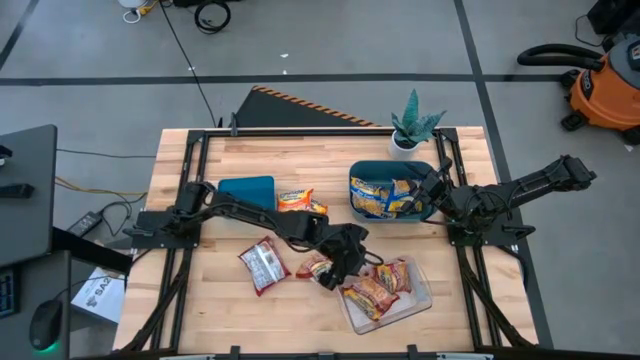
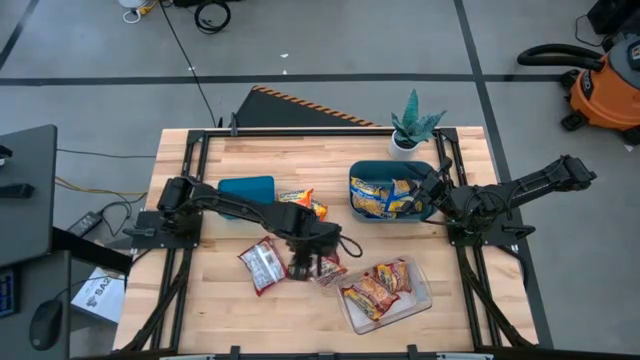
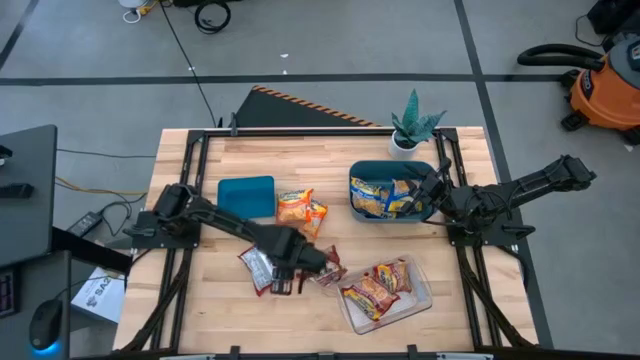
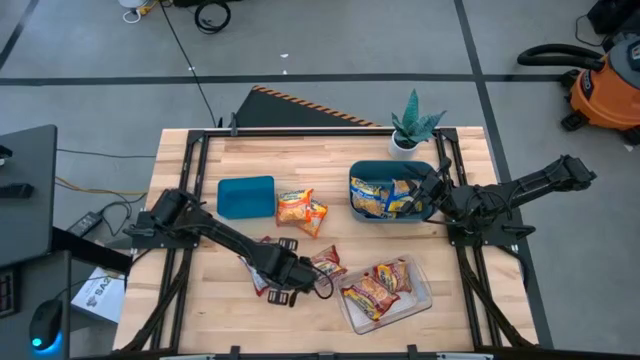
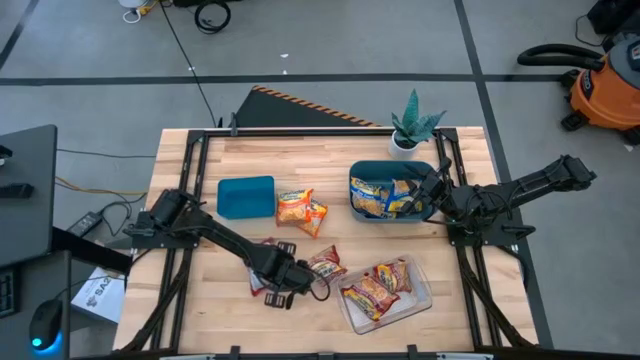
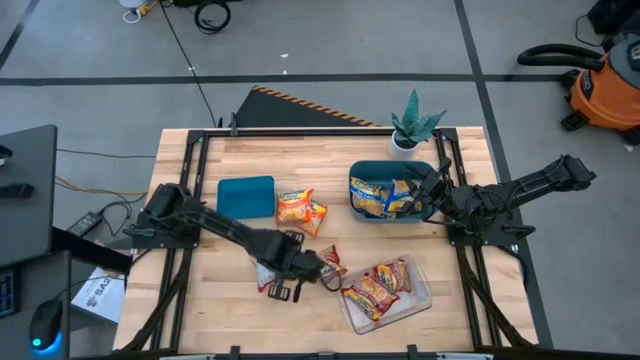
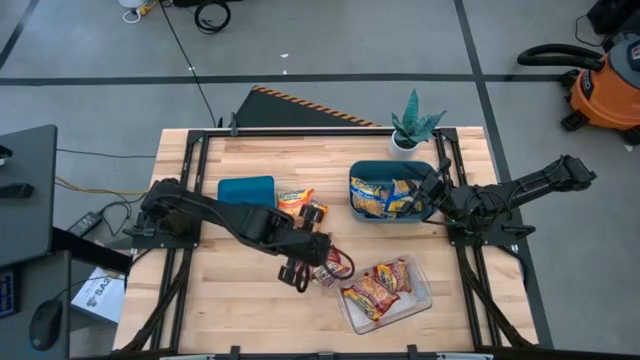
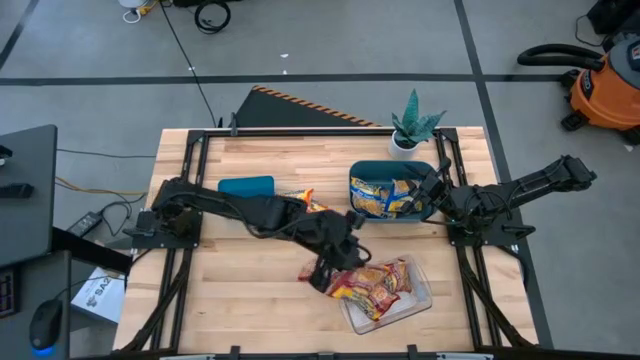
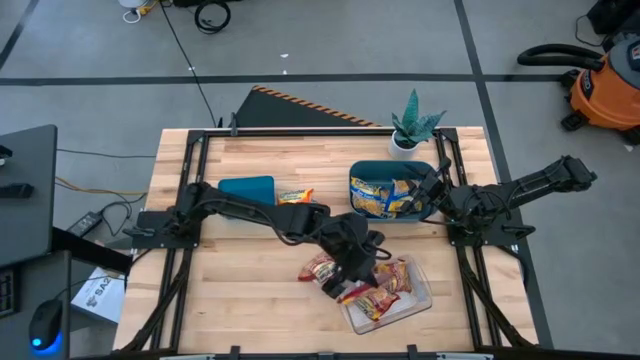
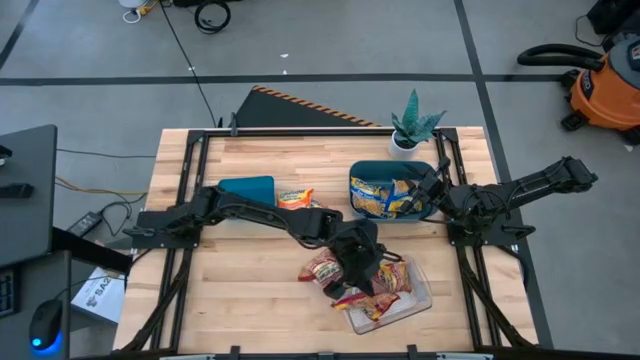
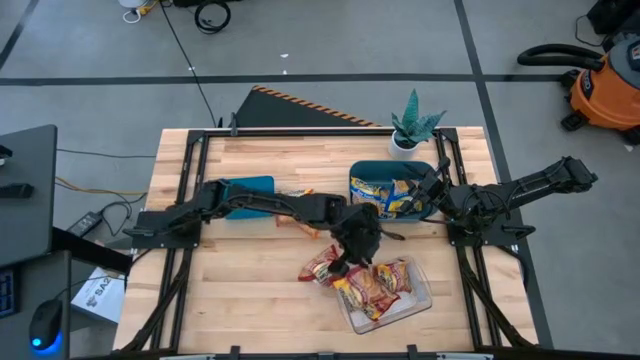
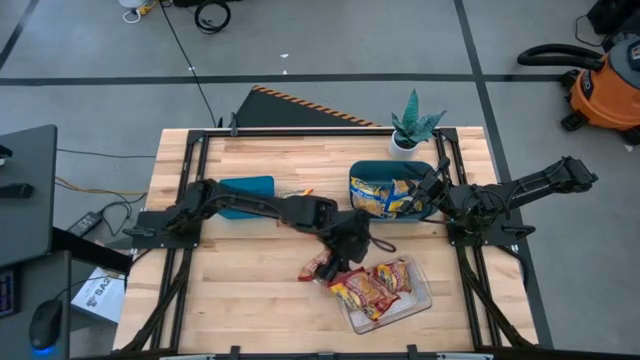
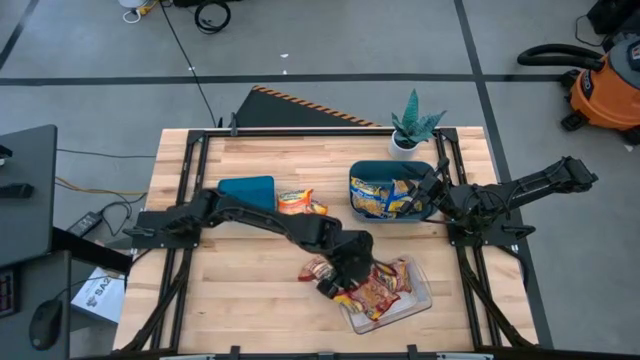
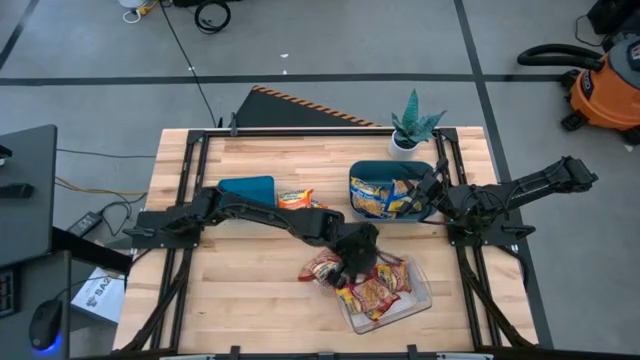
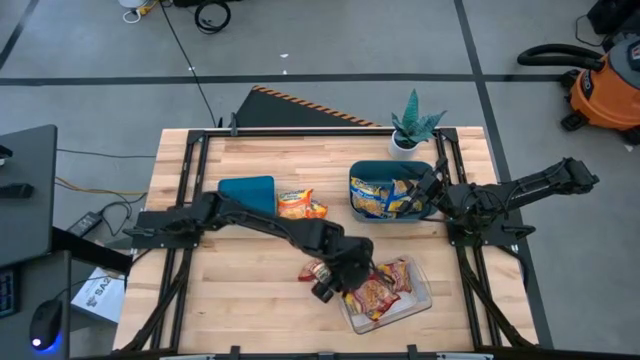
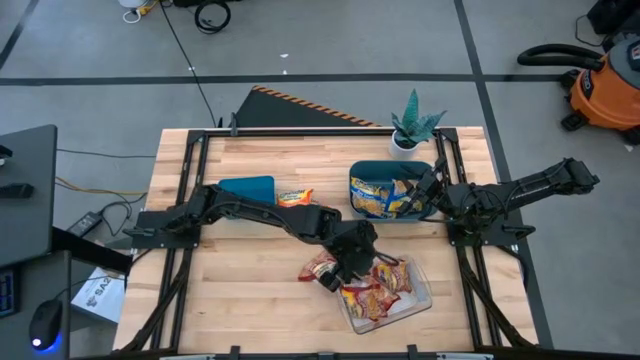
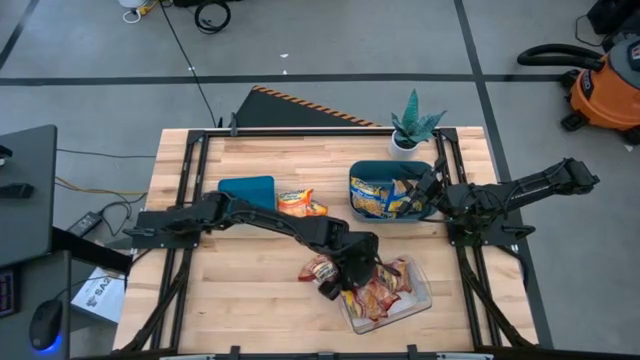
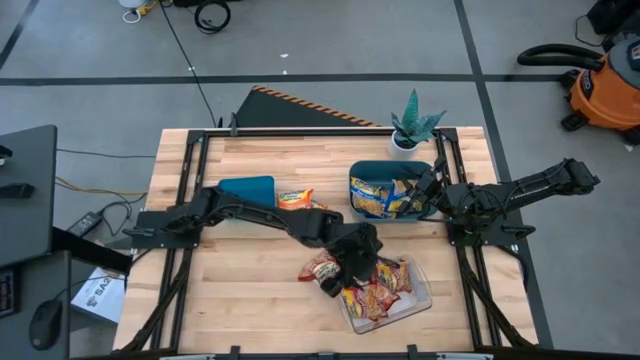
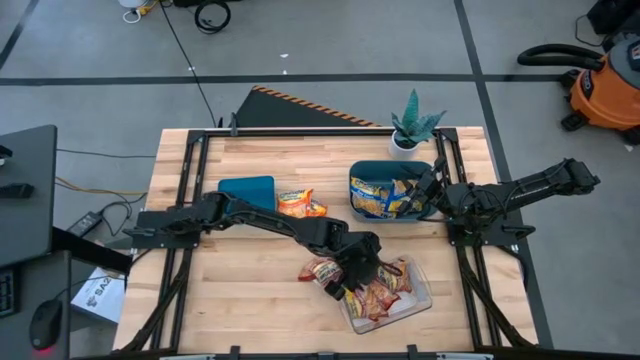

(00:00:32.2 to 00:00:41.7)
Task: Sort Maruchan noodles
Put the red noodle pack into the transparent bin

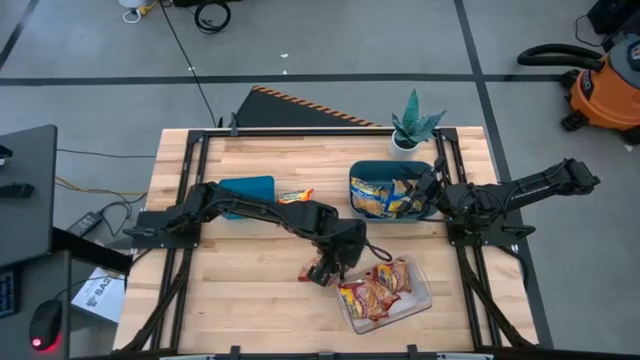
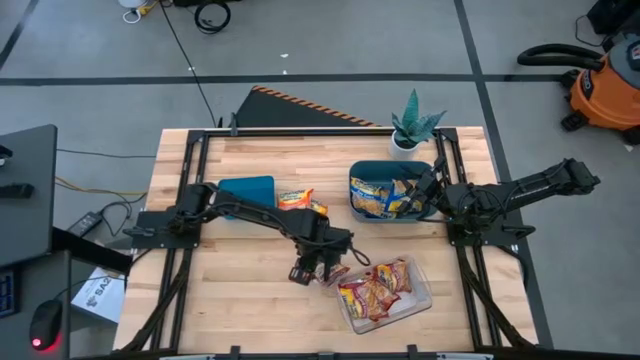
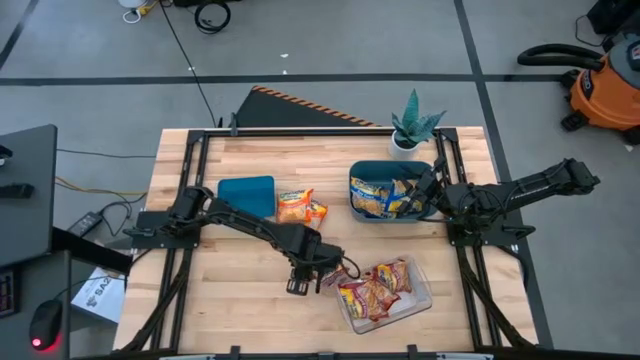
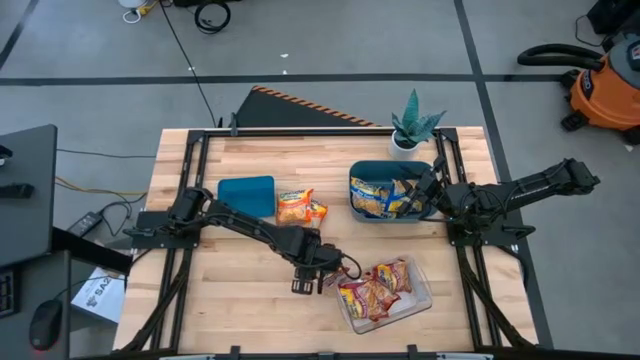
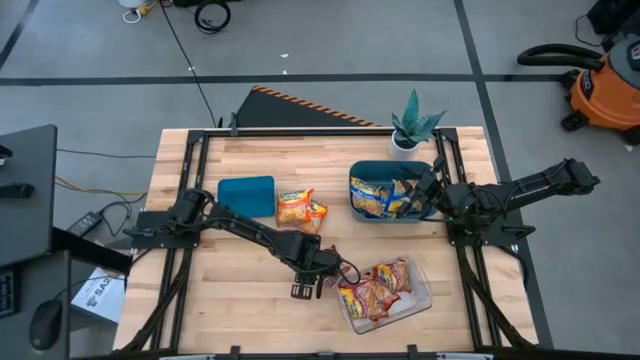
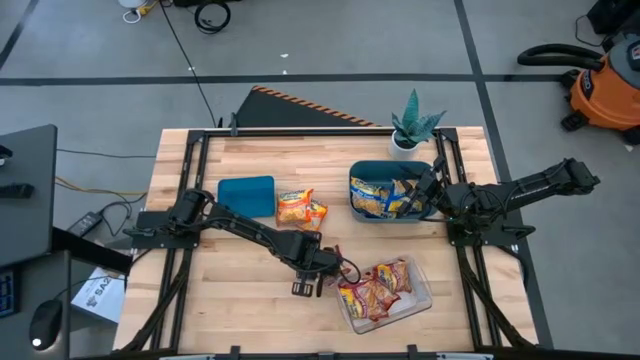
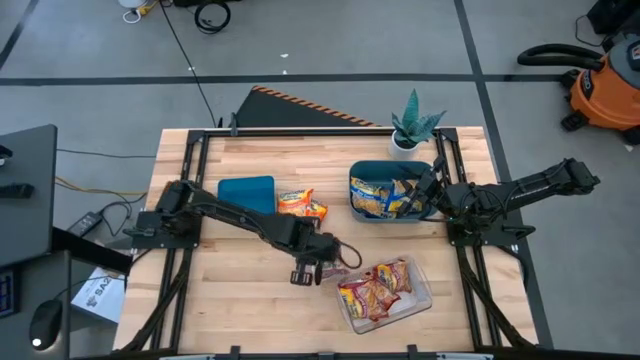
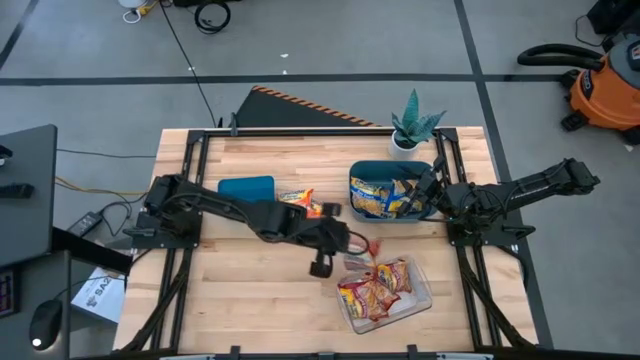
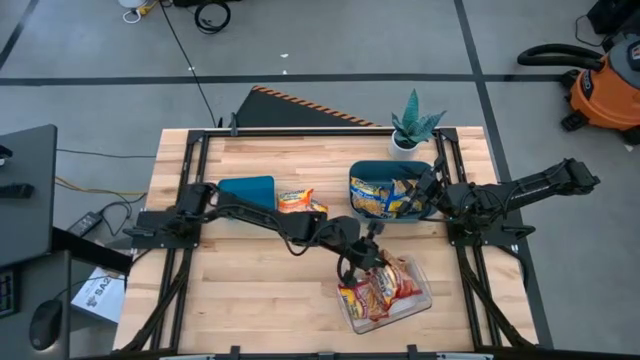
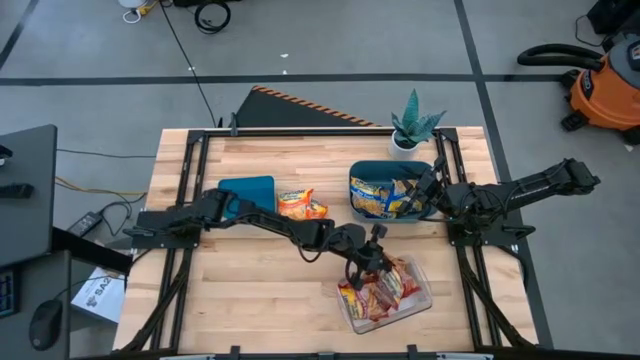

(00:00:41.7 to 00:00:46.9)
Put the red noodle pack into the transparent bin

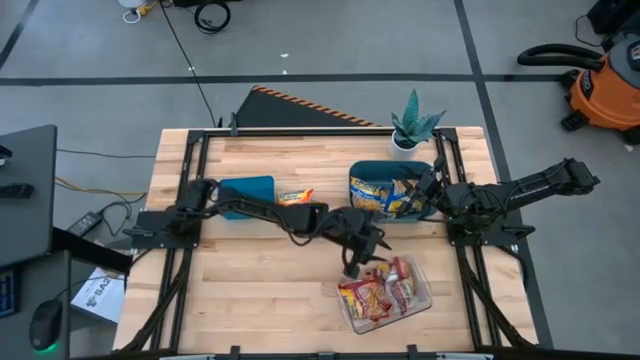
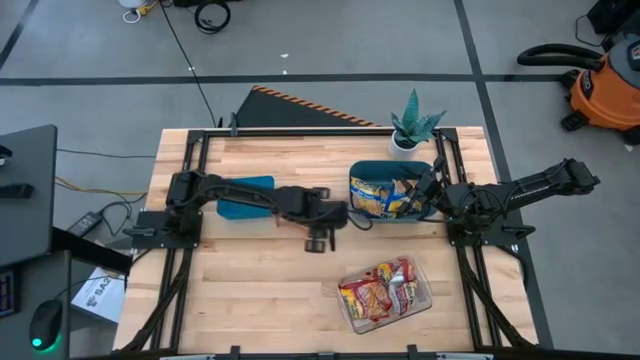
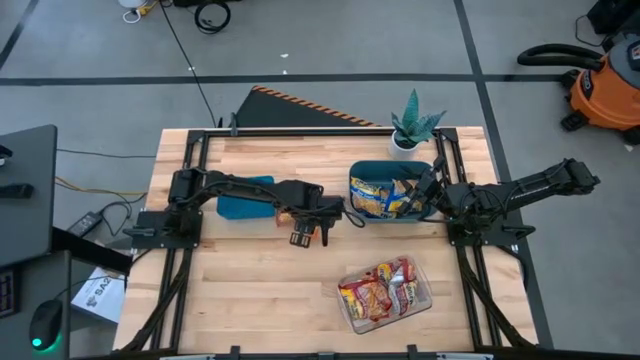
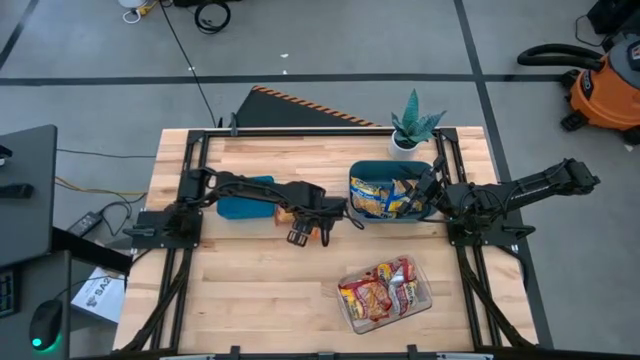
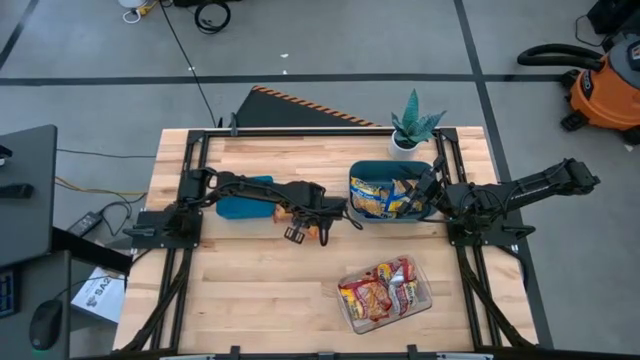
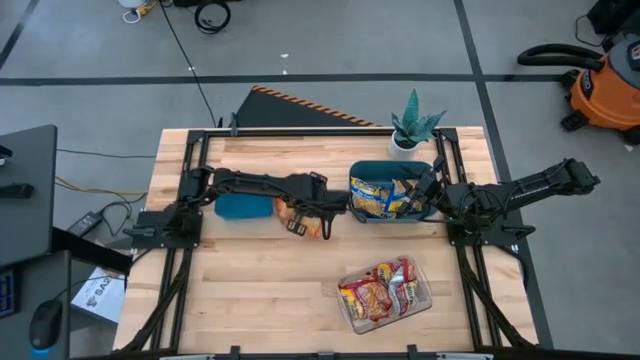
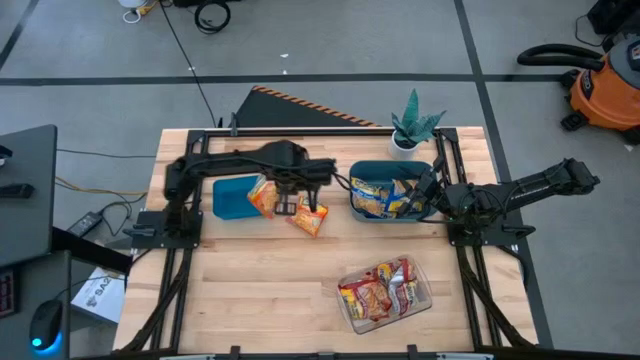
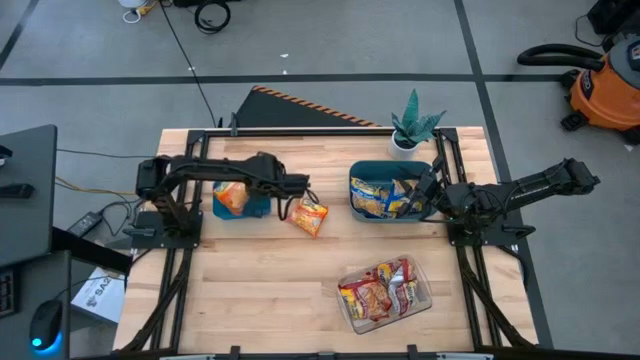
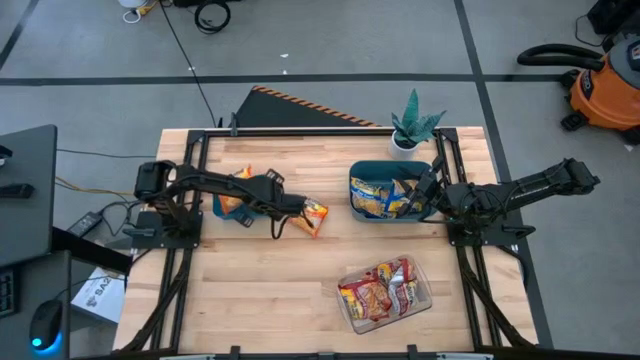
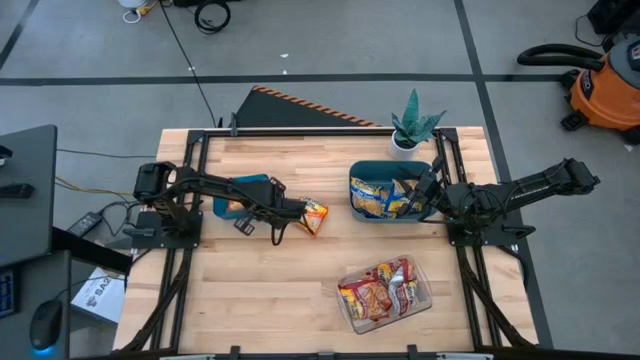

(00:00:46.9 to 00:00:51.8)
Put the orange noodle pack into the blue bin

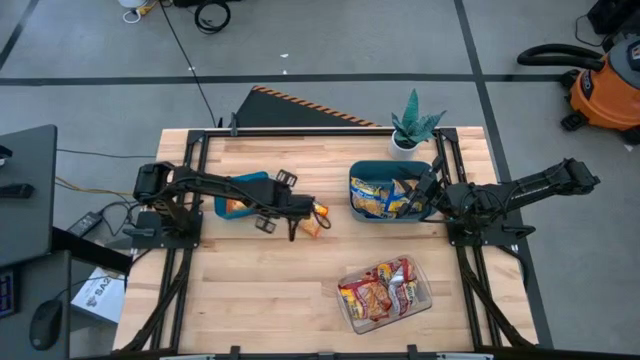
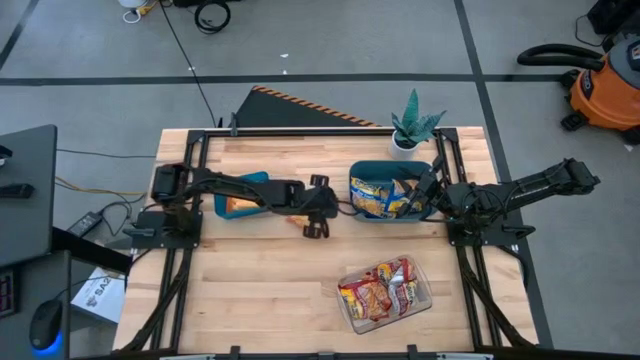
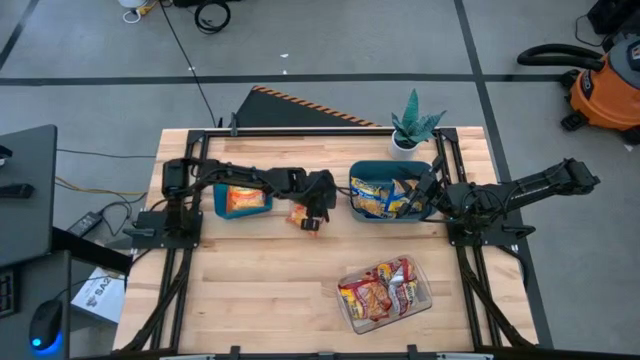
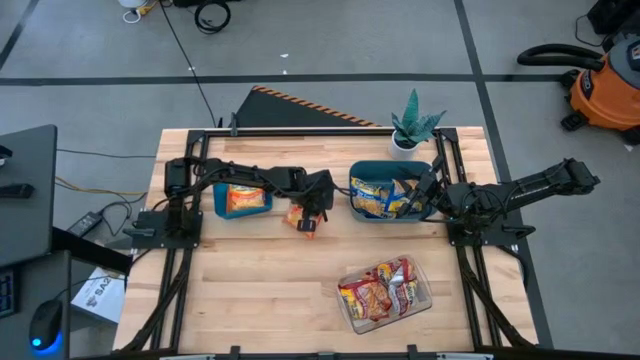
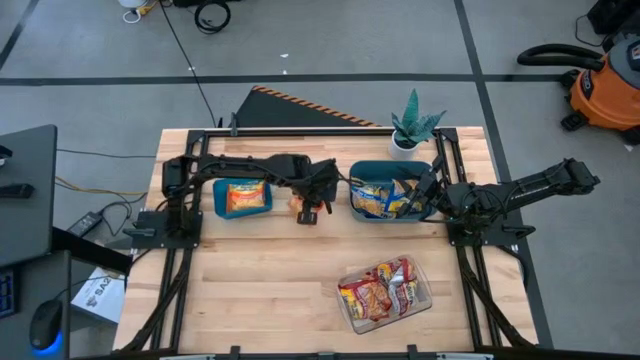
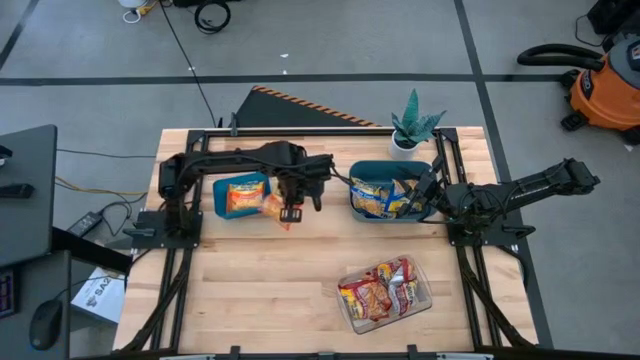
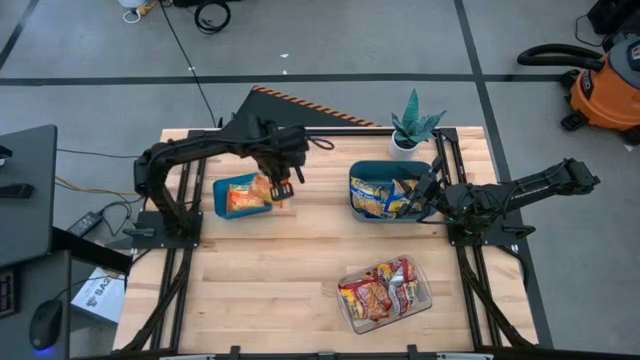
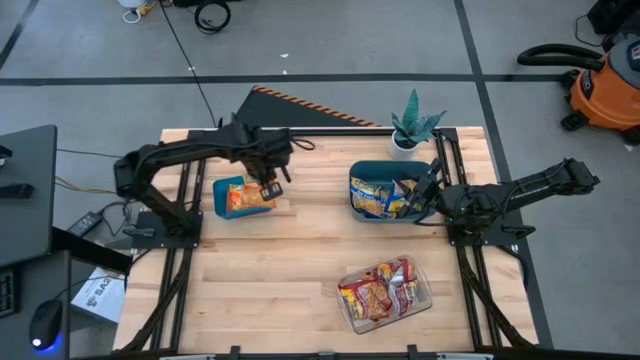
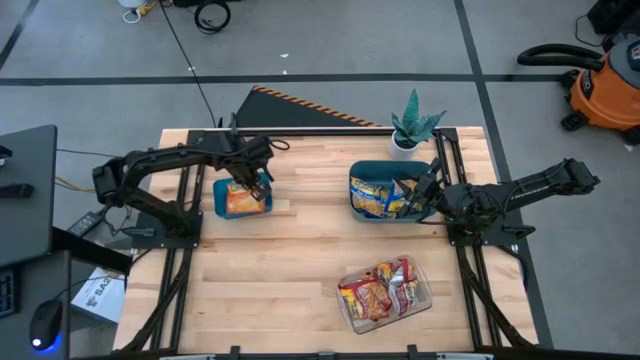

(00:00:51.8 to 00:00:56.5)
Put the orange noodle pack into the blue bin
